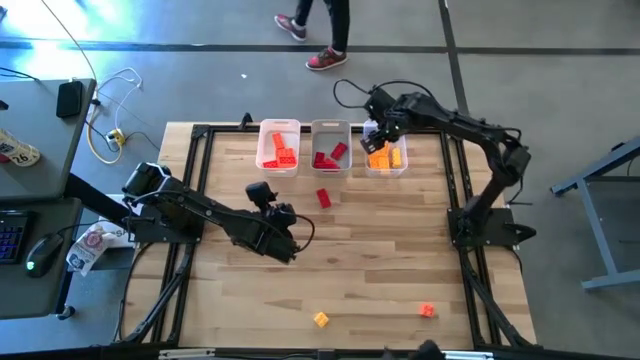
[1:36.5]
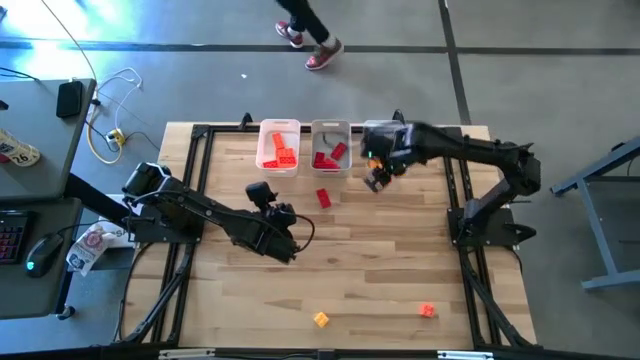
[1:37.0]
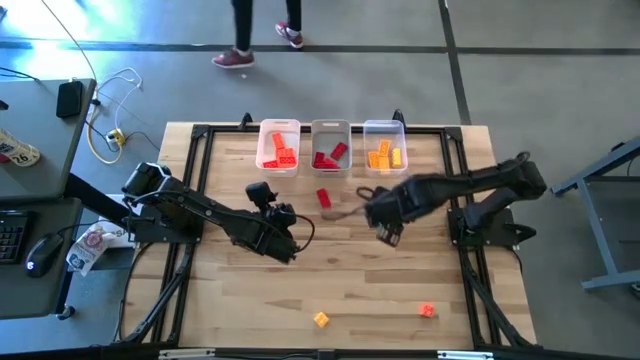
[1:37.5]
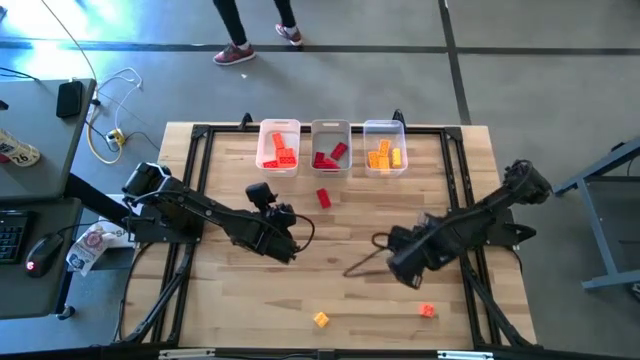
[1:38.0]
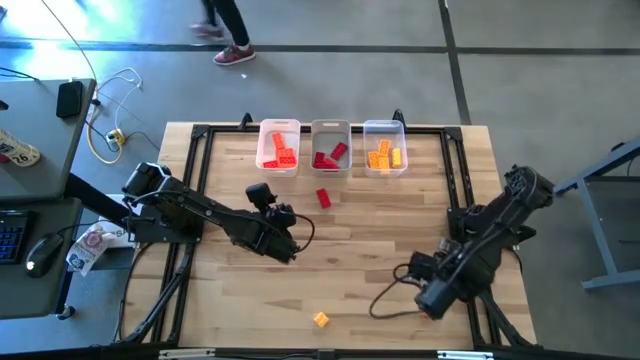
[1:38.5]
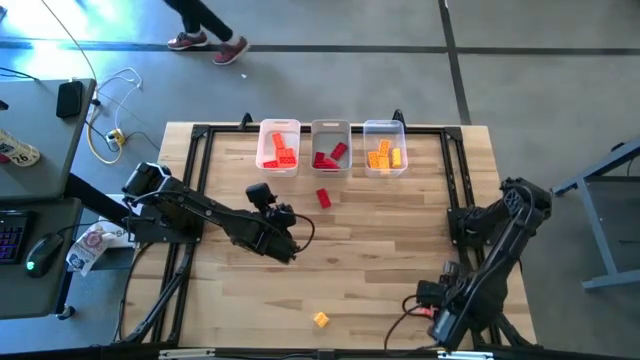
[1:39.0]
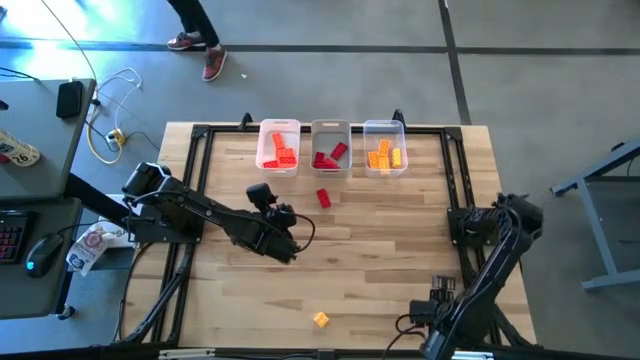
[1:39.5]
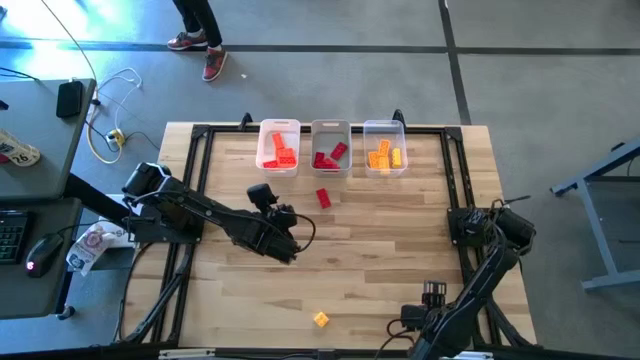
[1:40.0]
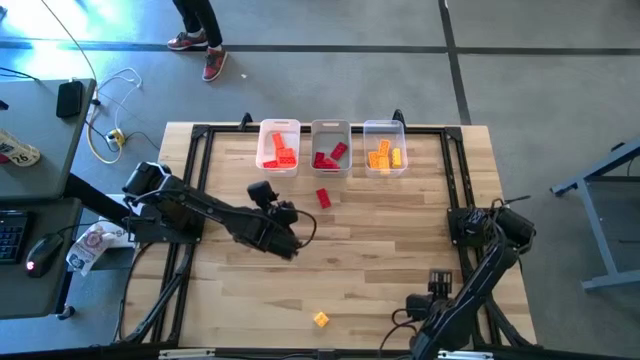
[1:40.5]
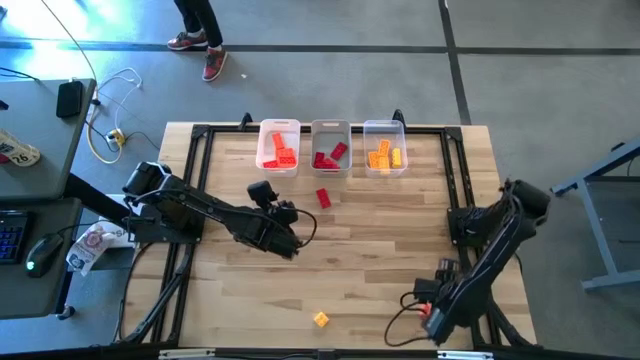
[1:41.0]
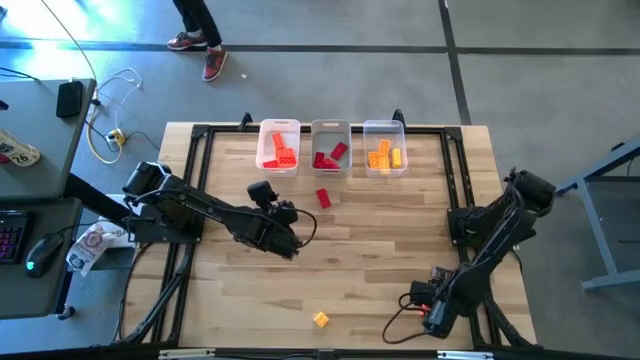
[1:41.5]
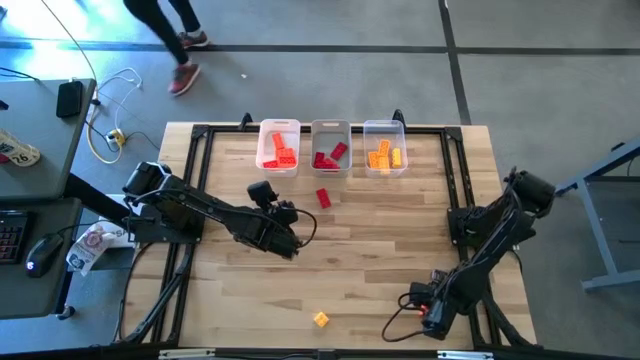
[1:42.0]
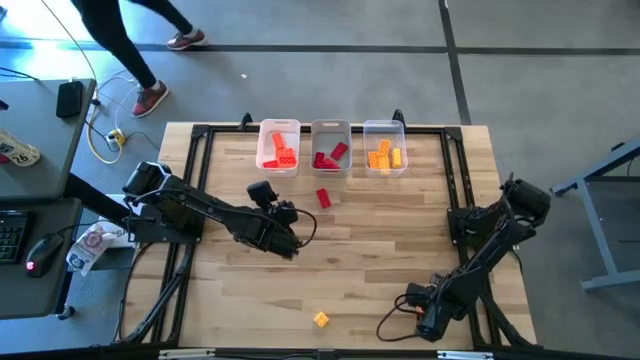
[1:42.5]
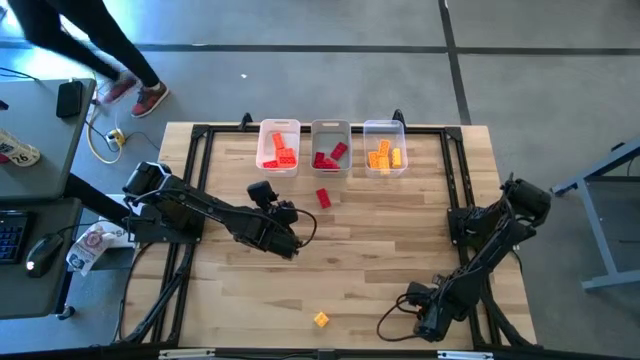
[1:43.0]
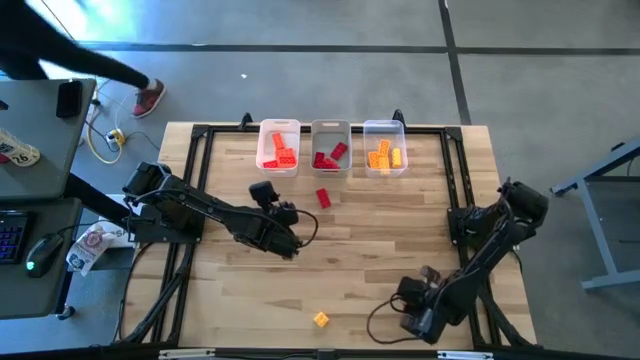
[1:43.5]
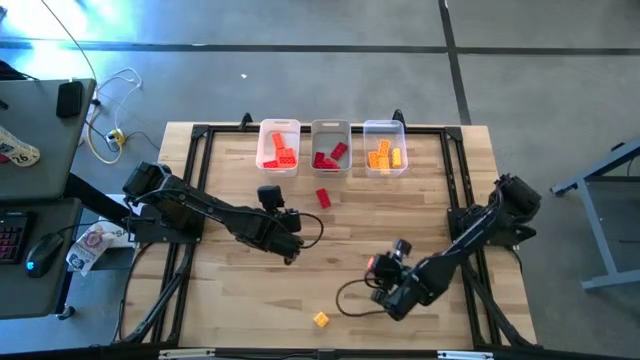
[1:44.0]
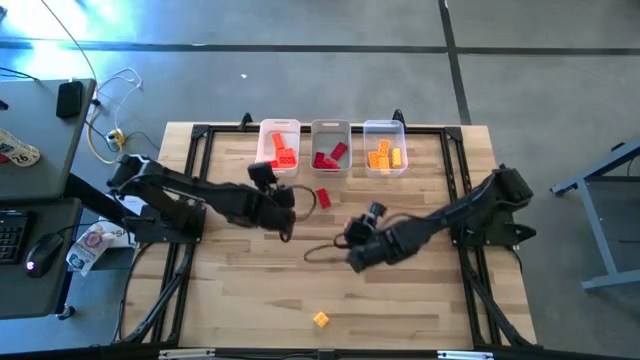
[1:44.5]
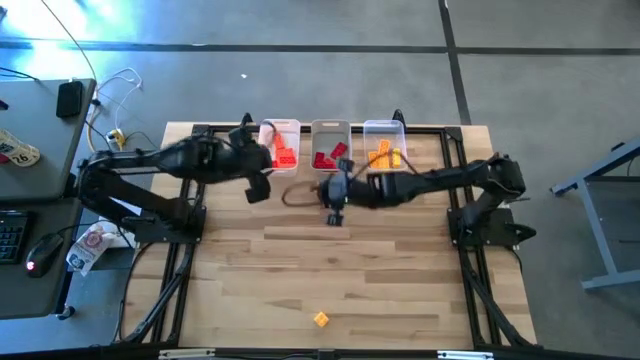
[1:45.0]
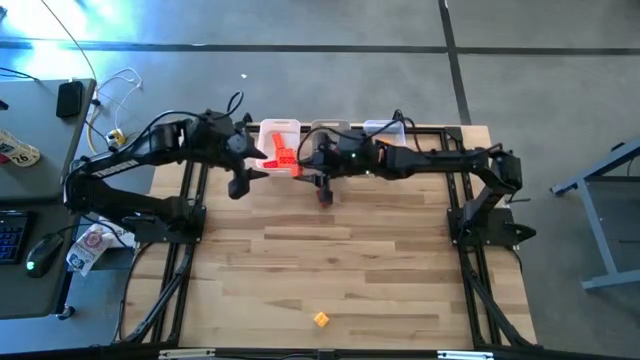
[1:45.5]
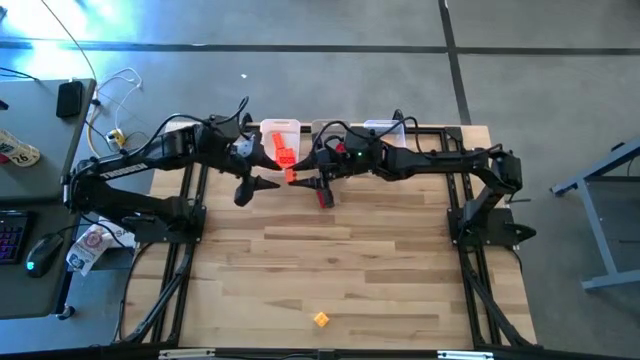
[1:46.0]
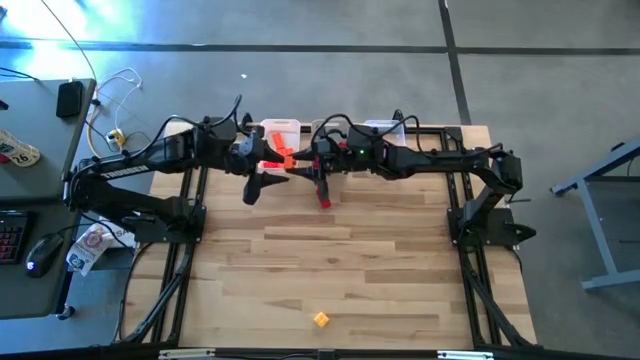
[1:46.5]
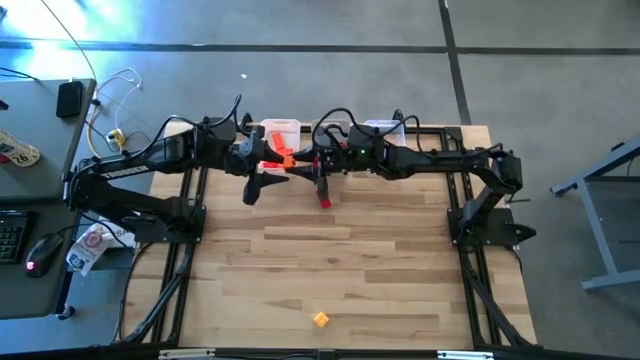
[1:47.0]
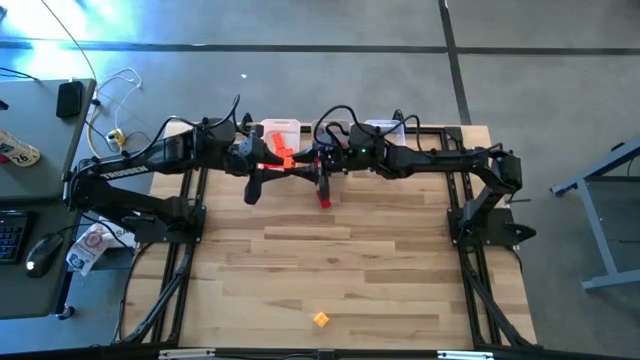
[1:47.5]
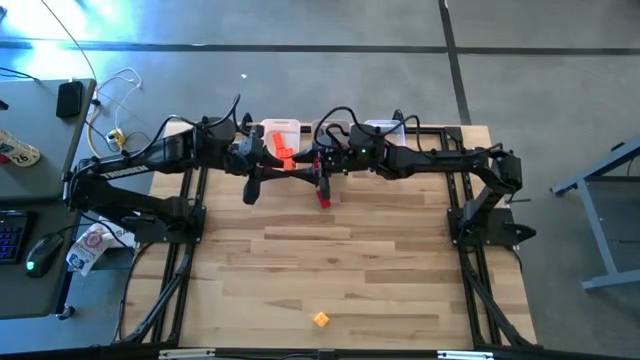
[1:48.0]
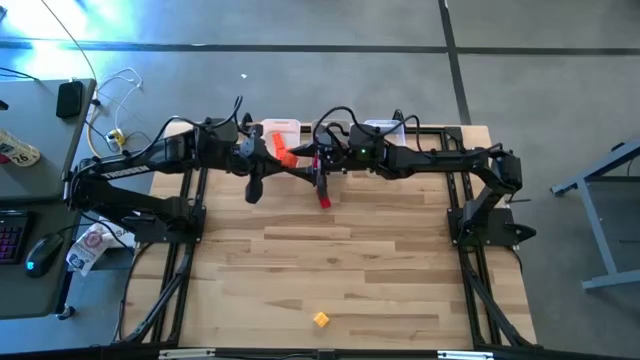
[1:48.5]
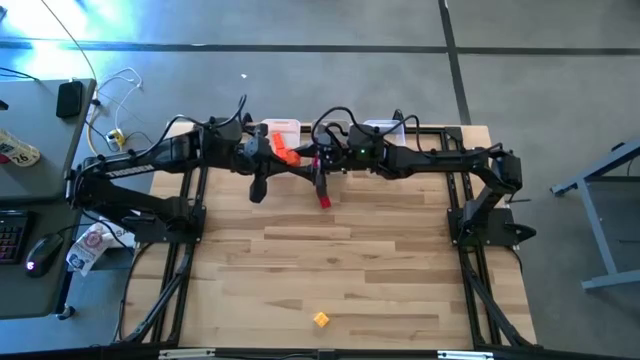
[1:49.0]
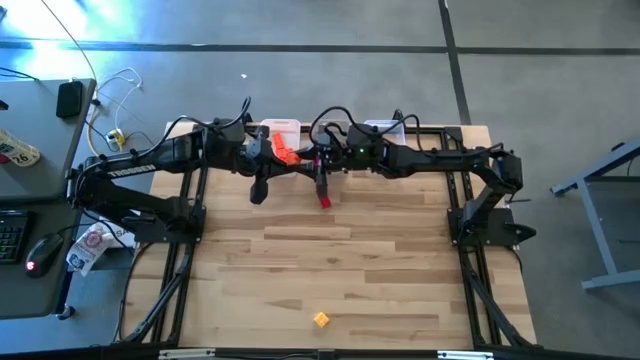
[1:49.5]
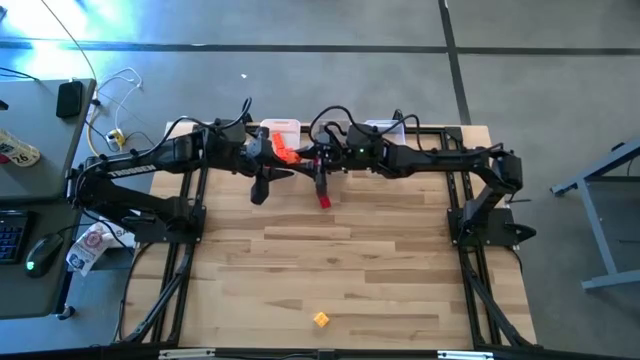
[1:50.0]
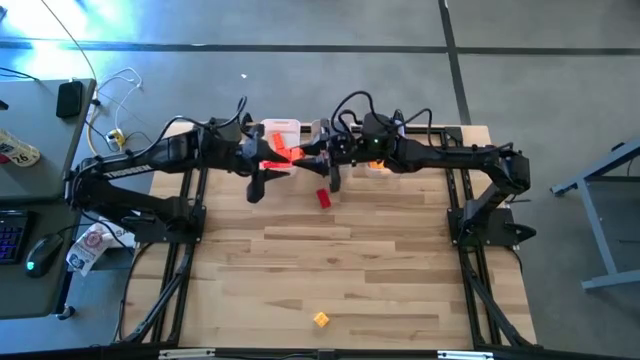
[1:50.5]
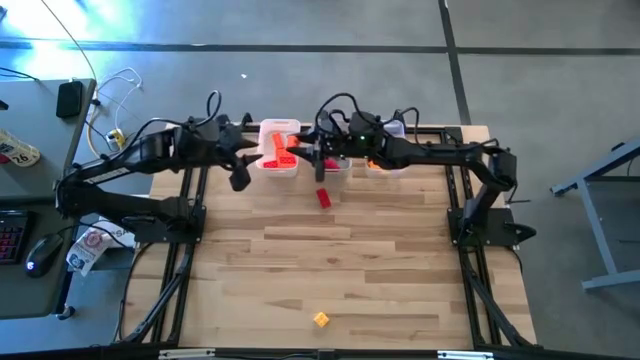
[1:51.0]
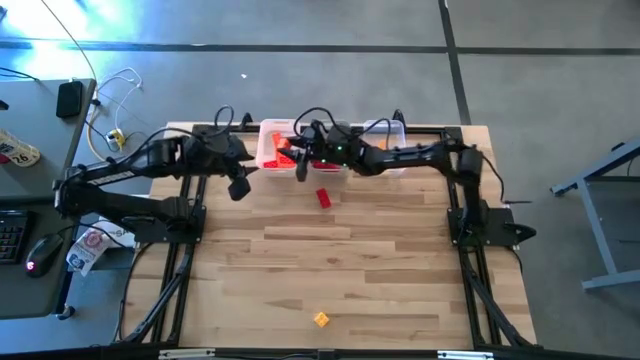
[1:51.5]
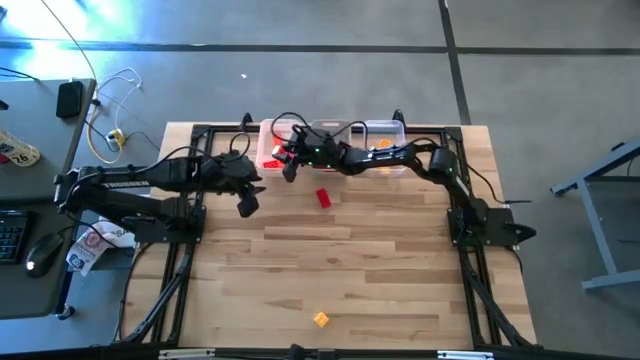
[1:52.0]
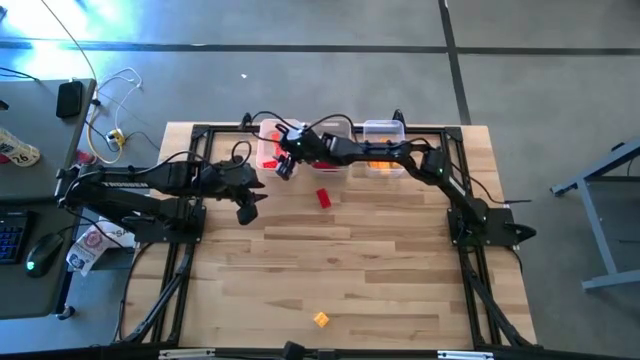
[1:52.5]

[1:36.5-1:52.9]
Task: Sort & place blocks by color
Put the orange game piece into the white bin

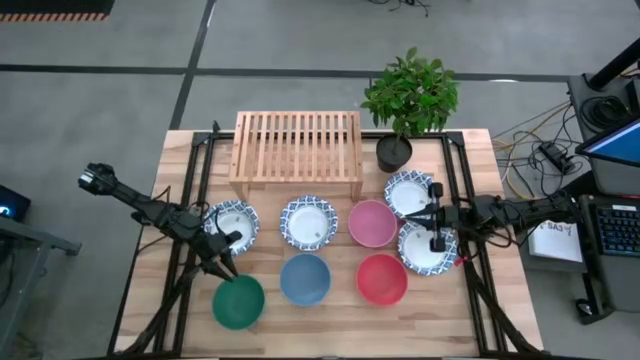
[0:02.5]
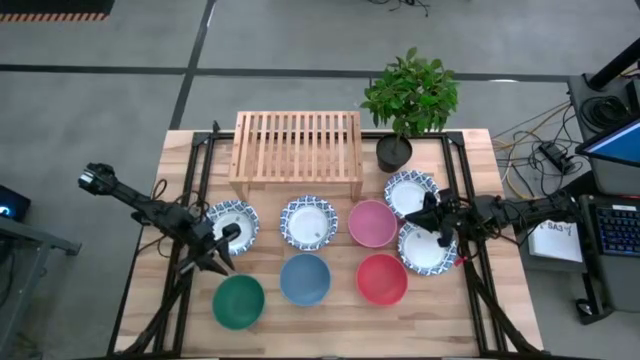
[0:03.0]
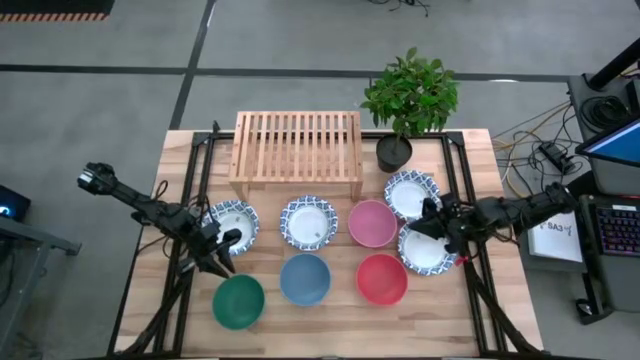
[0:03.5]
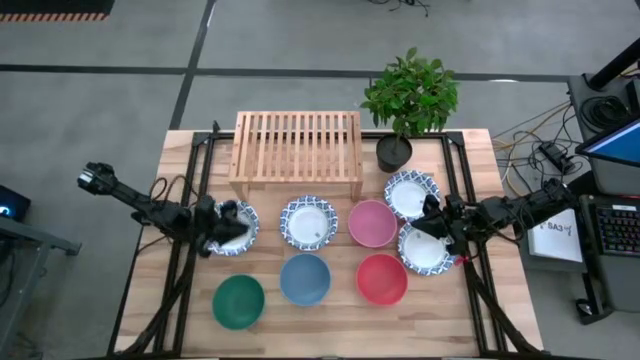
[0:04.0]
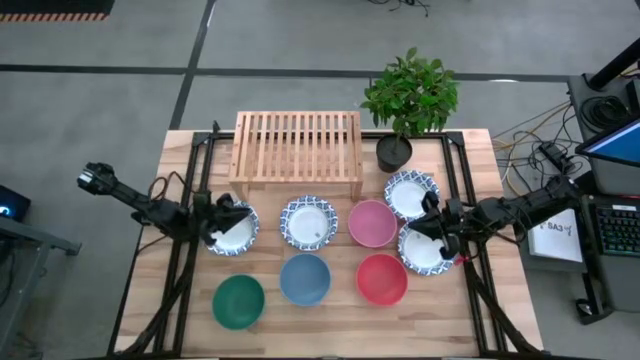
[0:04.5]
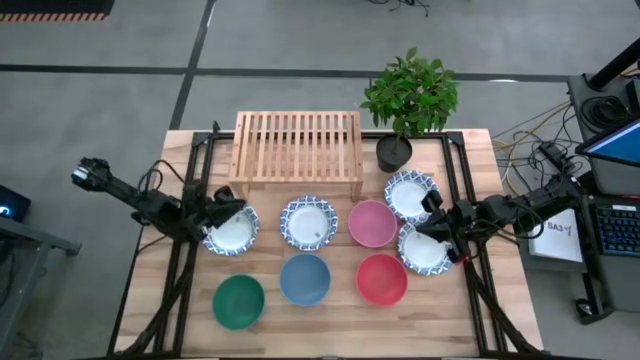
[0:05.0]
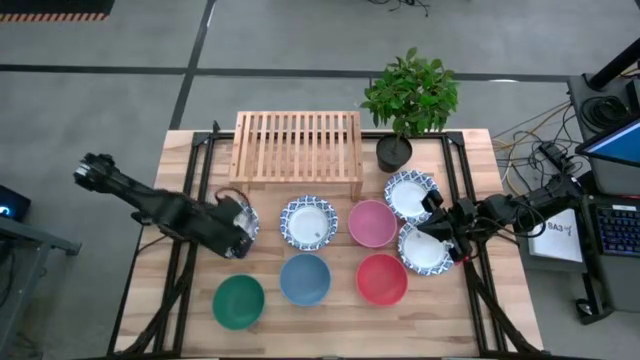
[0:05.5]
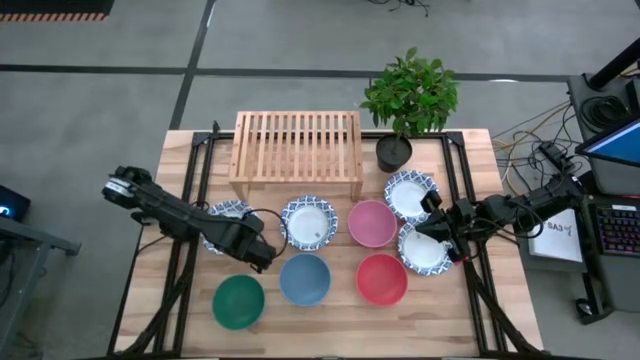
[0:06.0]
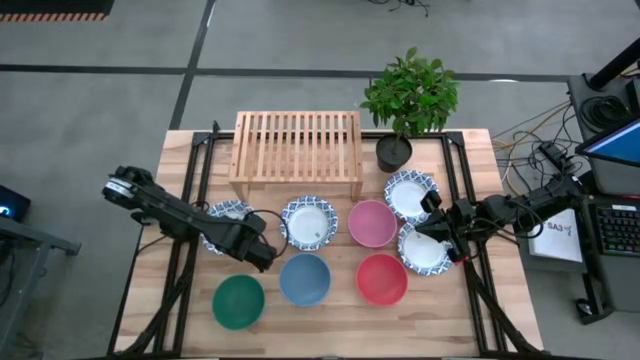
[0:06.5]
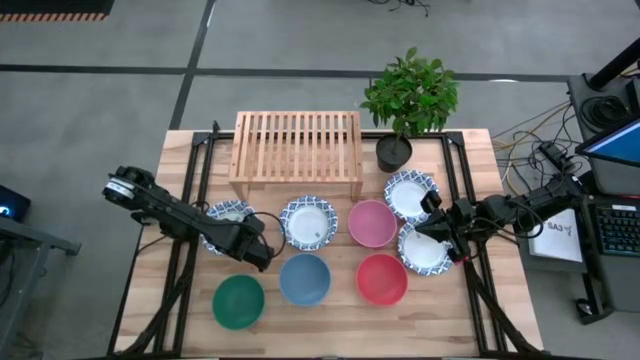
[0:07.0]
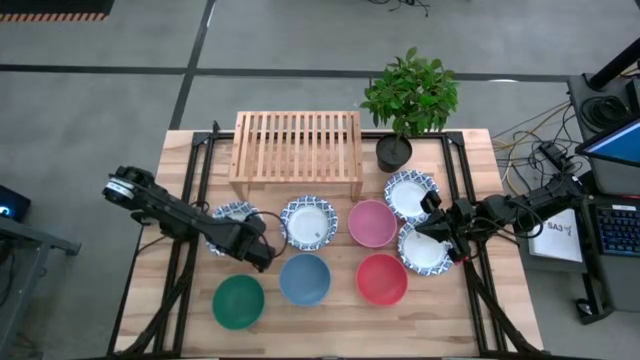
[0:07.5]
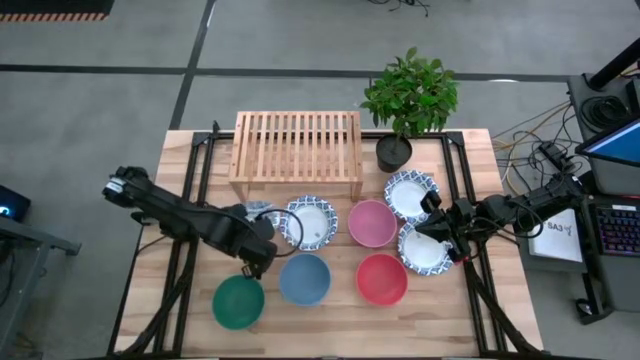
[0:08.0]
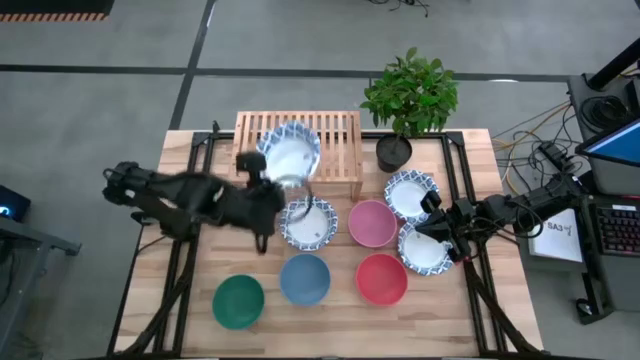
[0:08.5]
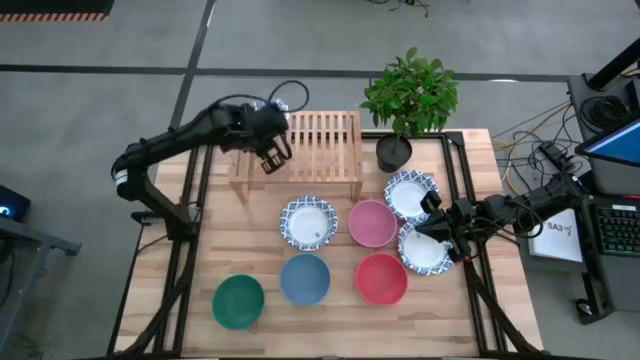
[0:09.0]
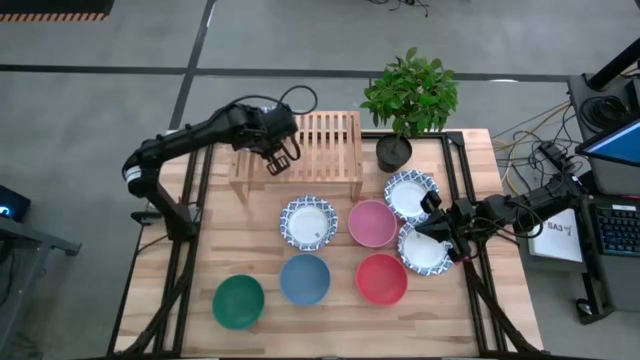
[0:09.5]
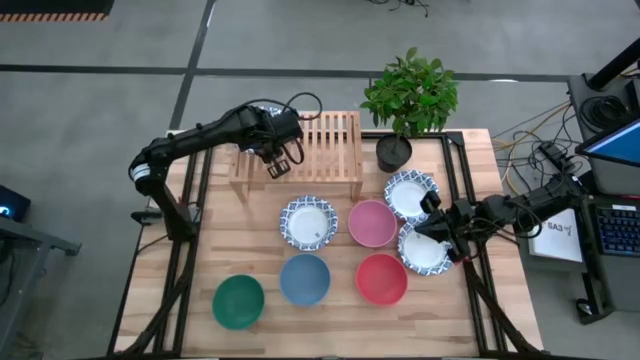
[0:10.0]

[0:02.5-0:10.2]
Task: Place and stack bowls onto a shelf
Put the white patterned bowl on the shelf
